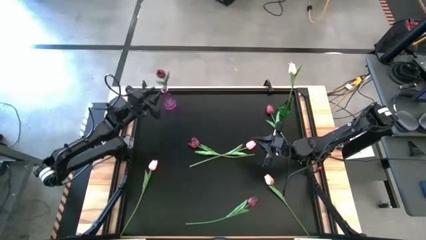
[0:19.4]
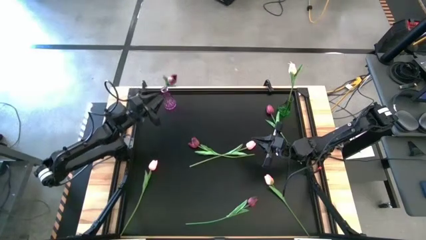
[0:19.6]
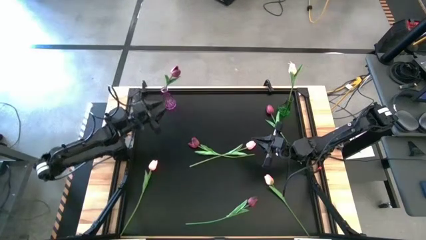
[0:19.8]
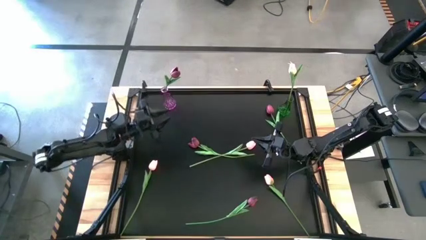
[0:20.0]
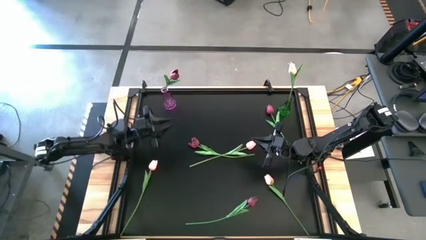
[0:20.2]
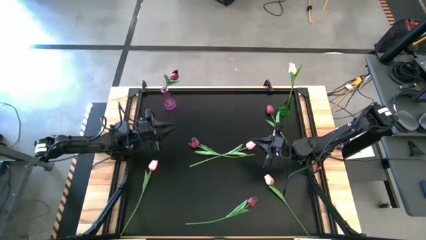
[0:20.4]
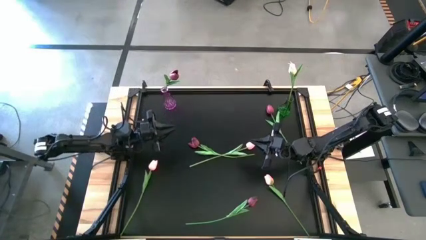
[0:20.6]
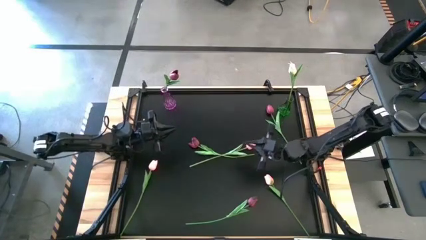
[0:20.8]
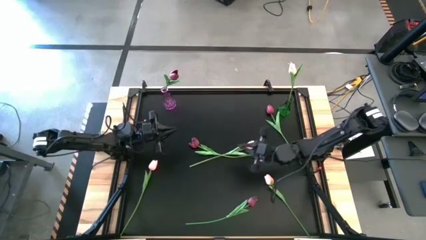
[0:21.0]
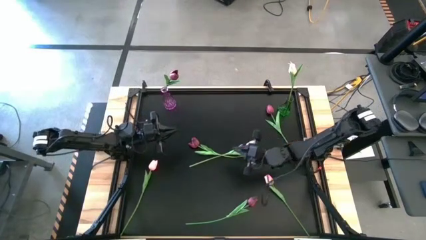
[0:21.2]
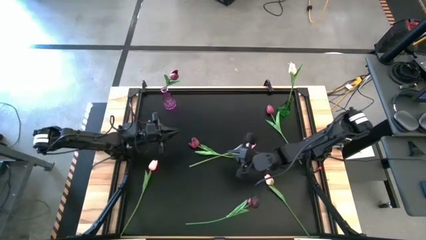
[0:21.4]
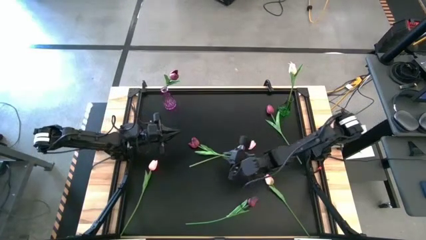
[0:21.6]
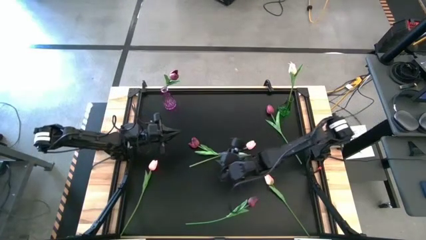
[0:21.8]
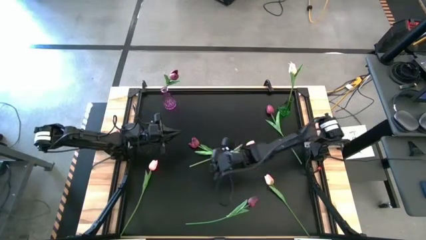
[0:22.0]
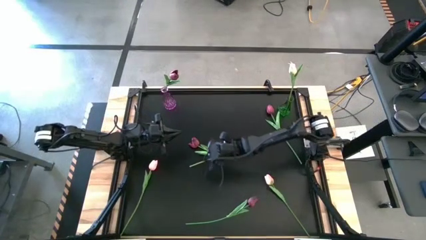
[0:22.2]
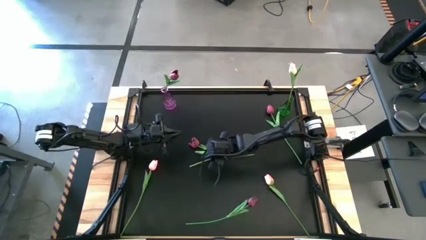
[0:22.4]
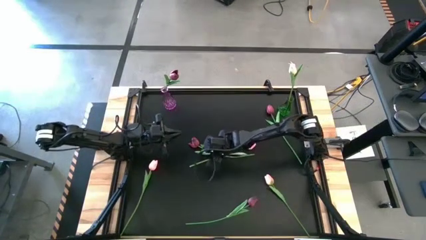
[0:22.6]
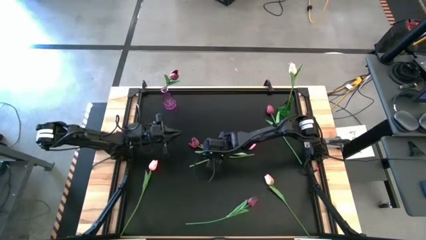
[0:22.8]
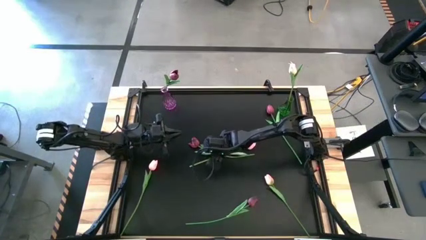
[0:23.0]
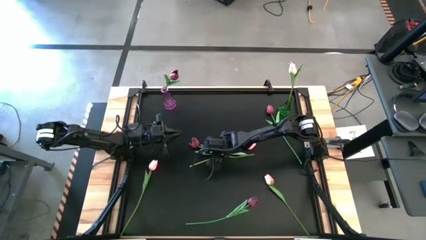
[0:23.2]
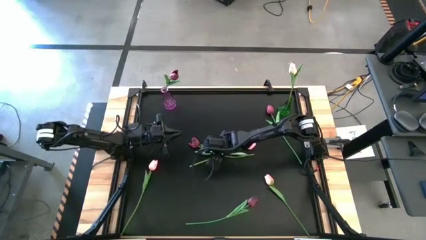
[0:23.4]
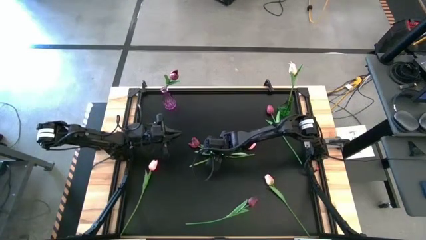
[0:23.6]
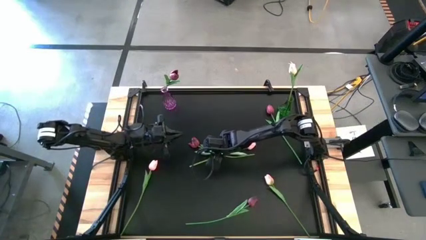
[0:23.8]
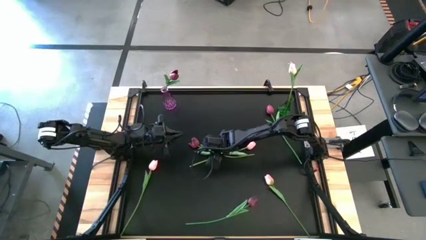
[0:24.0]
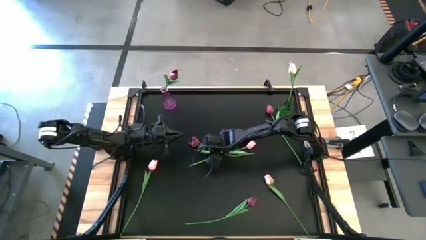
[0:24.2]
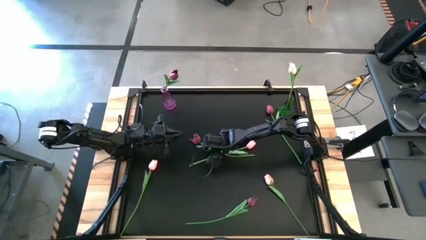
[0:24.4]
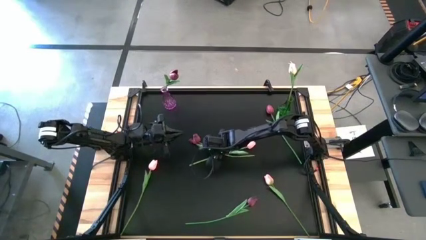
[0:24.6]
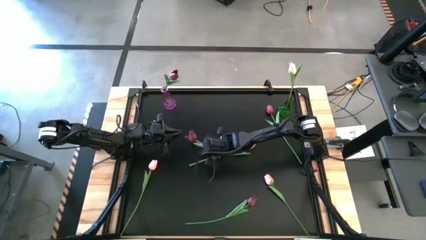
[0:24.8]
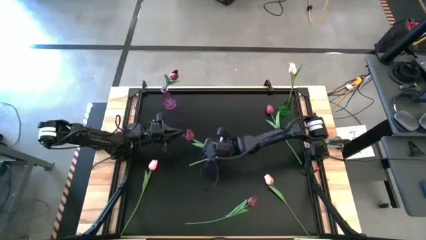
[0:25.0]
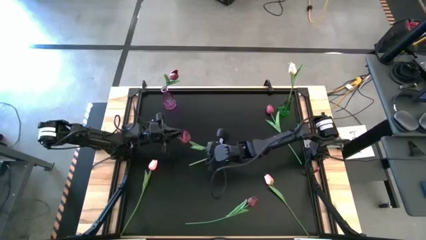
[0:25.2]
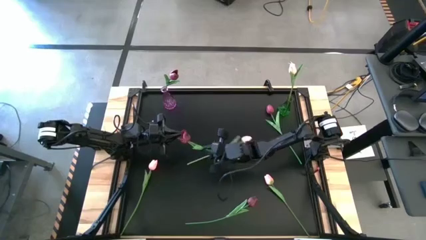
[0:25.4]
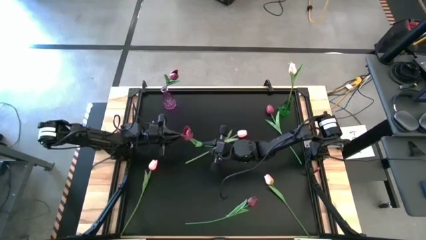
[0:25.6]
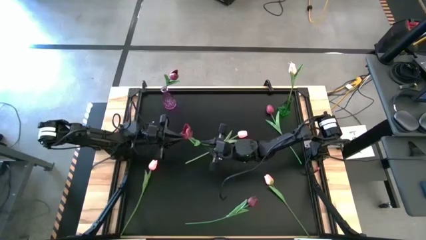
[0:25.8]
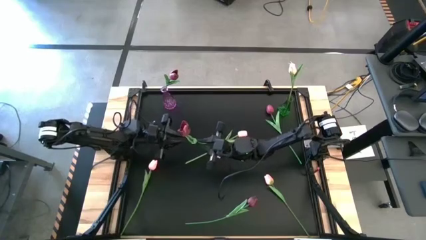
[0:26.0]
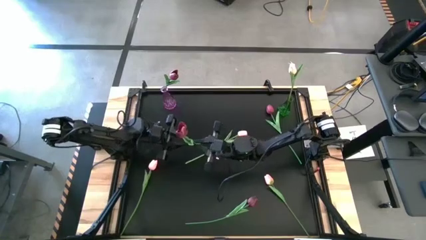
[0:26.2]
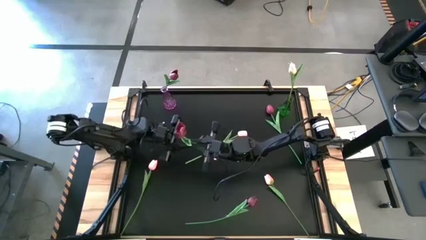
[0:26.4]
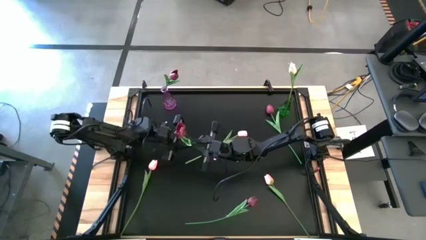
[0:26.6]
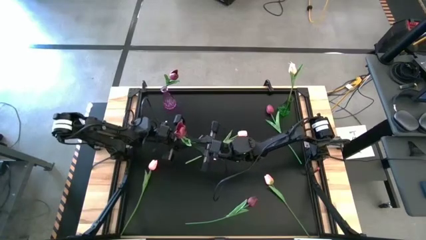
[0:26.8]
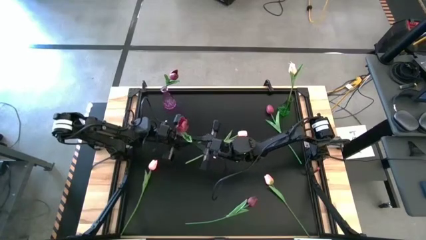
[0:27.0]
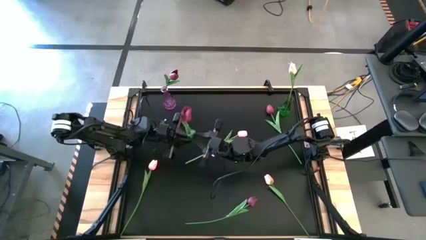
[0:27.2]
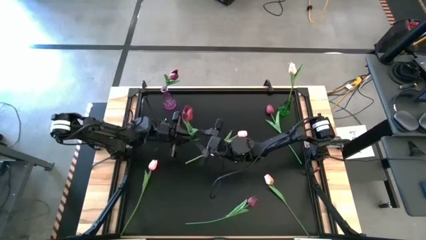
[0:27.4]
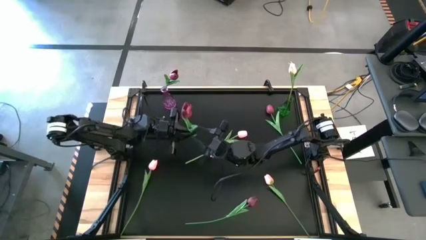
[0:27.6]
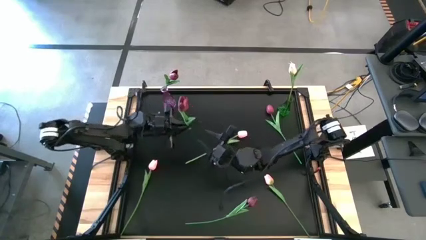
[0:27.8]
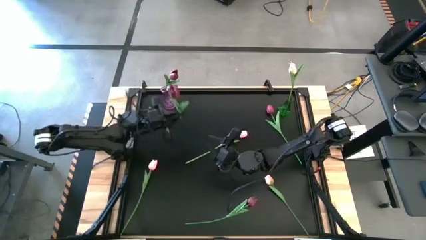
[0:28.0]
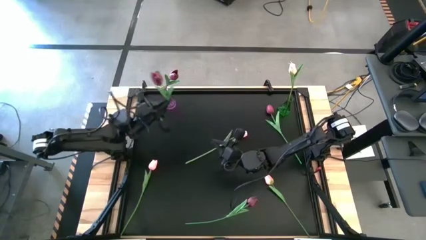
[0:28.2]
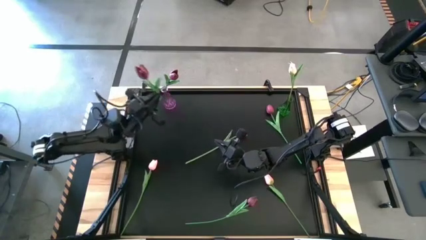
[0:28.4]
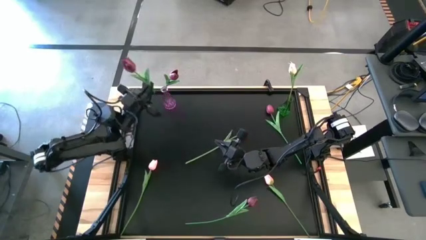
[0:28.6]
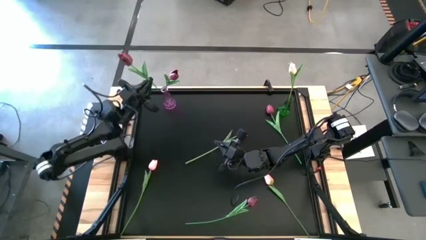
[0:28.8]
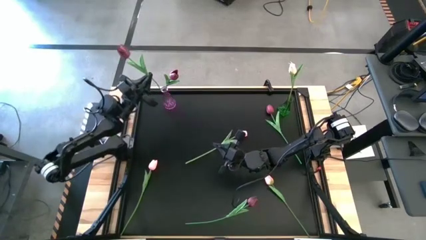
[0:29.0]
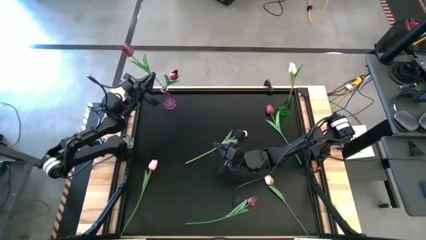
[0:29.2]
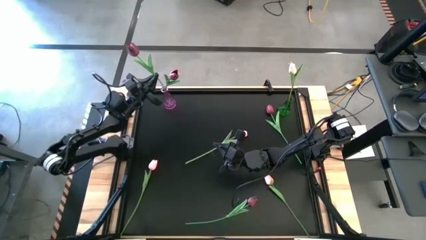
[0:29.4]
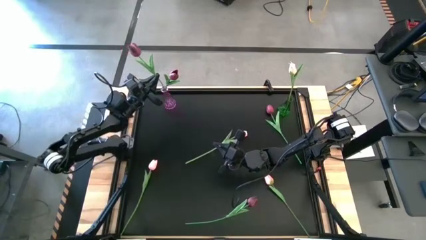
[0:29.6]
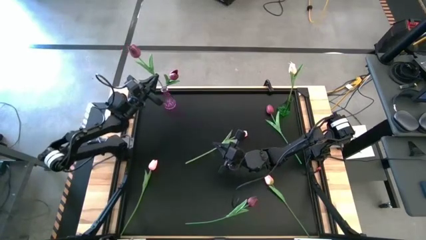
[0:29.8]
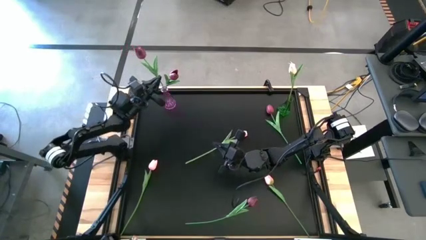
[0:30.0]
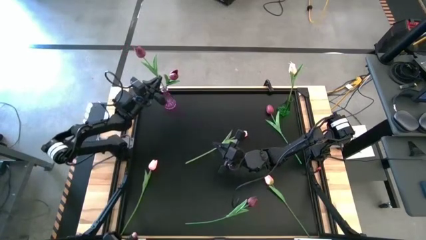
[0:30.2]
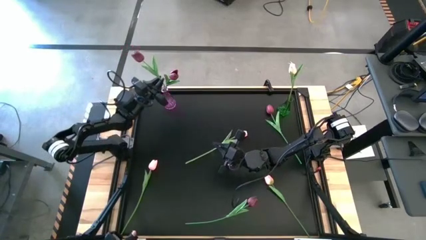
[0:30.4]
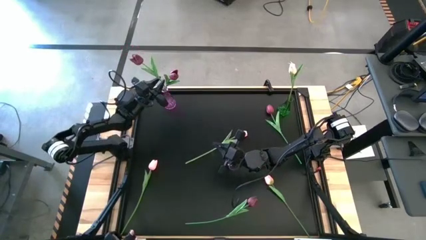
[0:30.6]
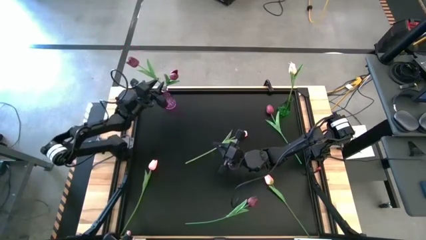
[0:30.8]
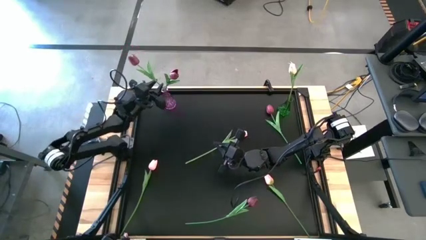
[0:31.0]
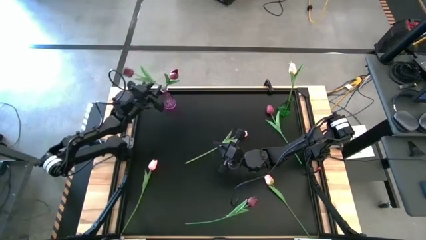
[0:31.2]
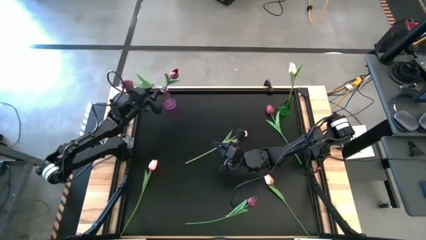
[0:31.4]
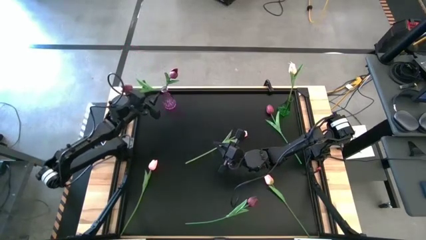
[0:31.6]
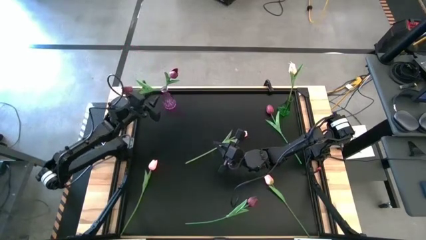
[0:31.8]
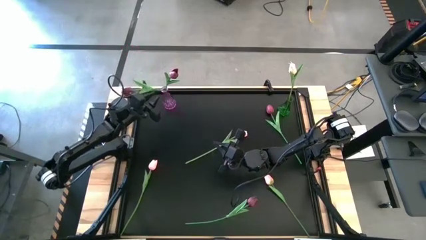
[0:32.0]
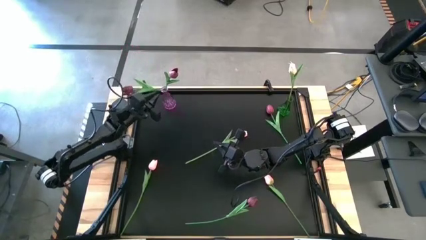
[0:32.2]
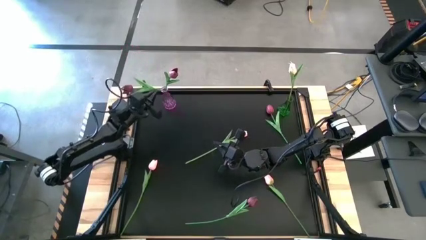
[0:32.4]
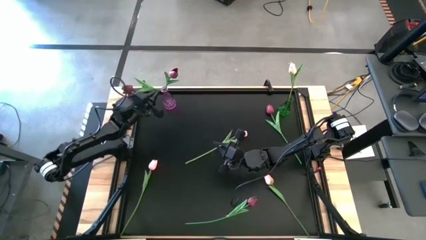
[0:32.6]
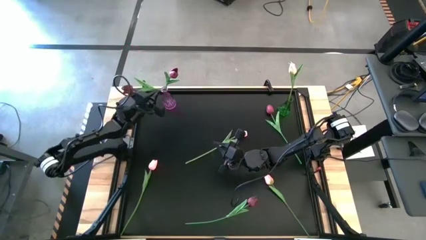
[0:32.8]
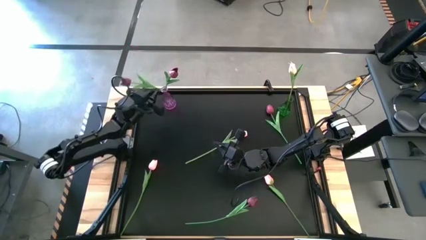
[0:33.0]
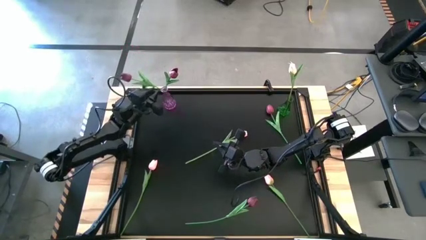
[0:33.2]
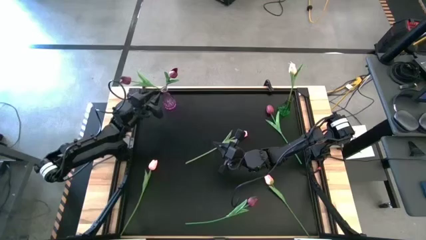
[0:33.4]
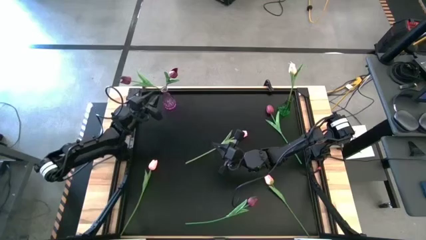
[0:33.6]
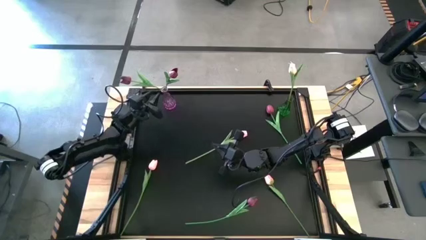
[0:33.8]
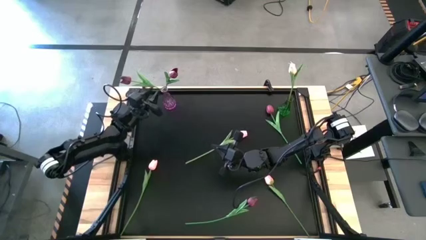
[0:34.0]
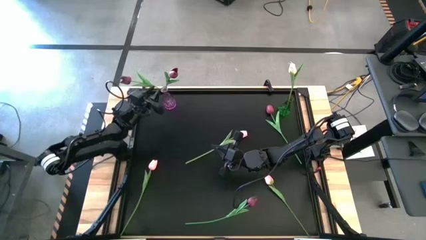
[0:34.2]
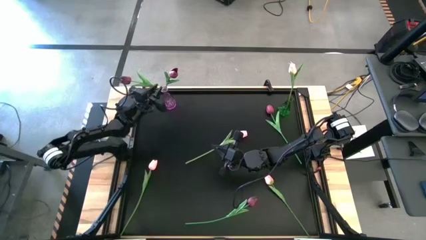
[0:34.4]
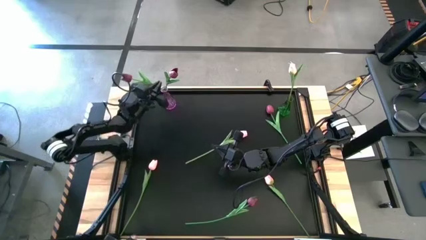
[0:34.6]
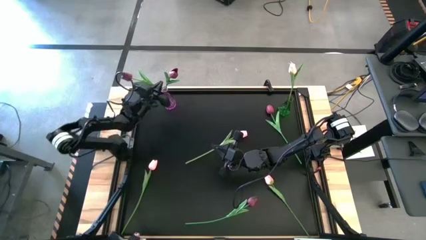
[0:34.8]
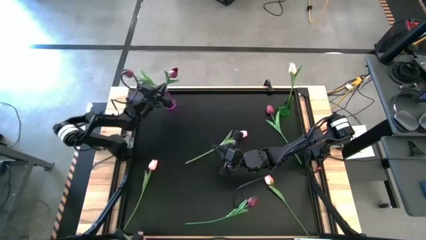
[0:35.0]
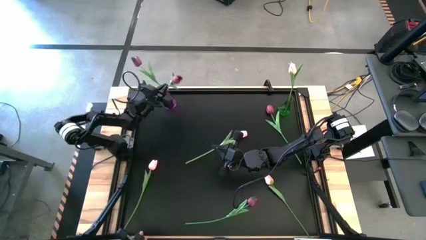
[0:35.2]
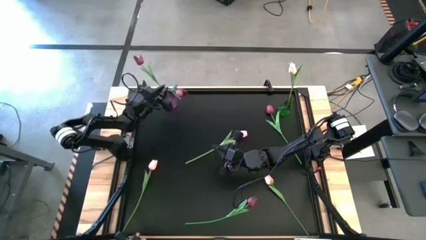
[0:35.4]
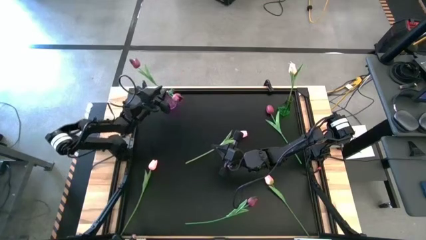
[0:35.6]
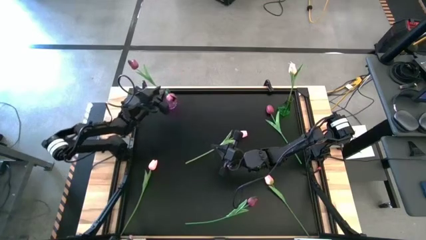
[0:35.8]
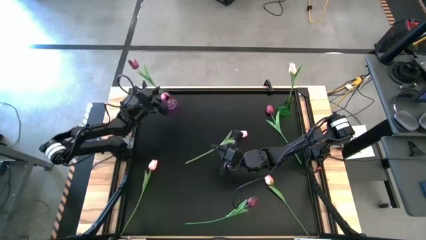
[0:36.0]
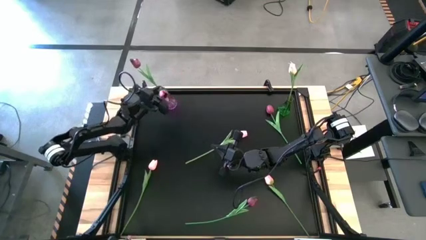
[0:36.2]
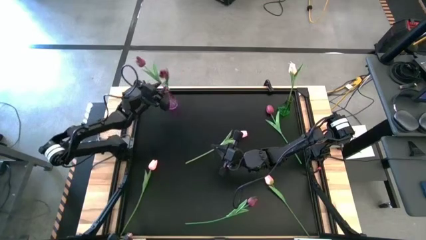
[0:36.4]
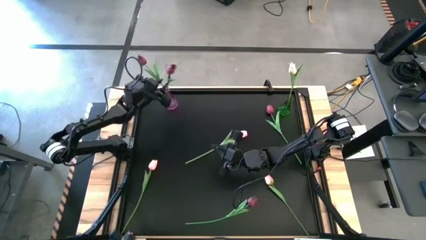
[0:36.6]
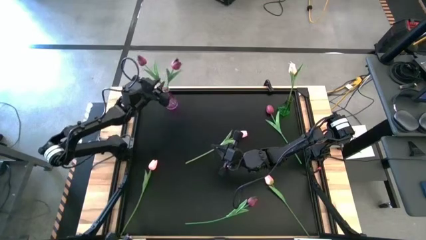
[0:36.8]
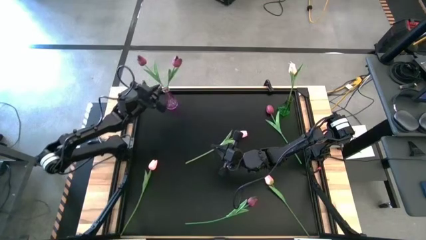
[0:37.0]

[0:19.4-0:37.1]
Task: Sort flowers into vase by color
Put the red flower into the violet vase
